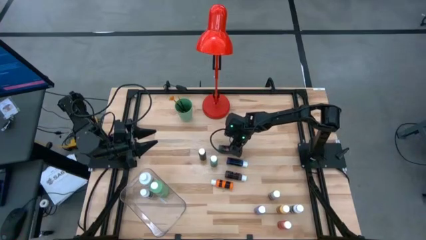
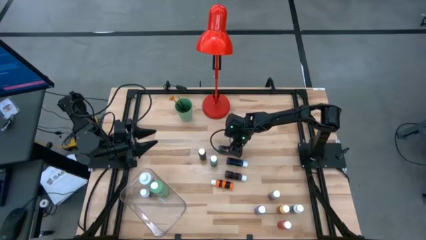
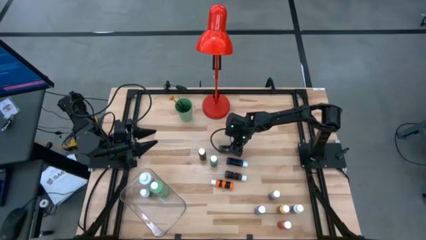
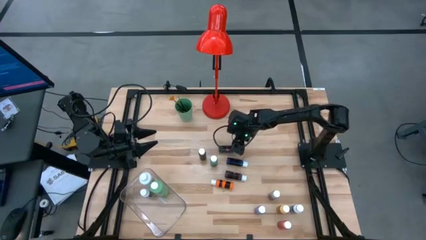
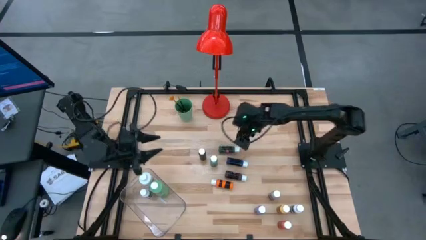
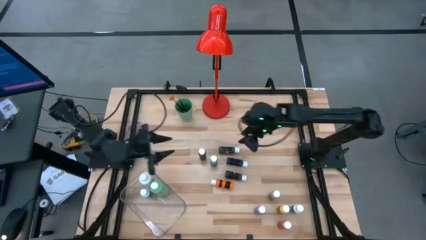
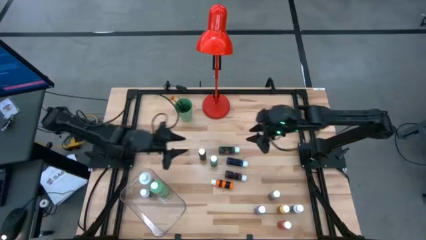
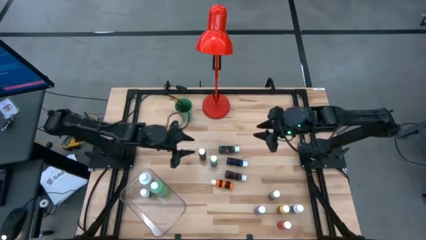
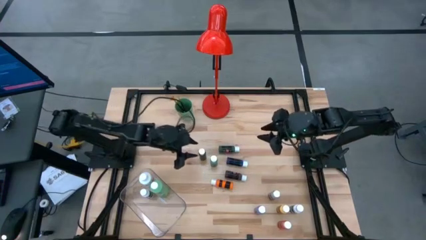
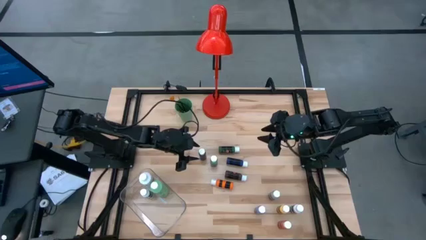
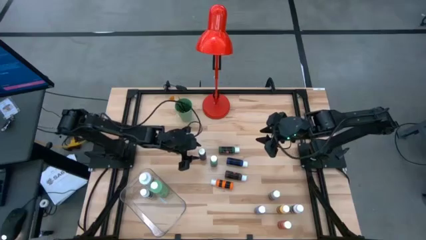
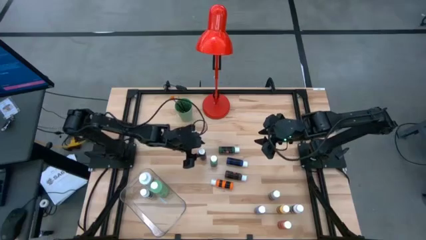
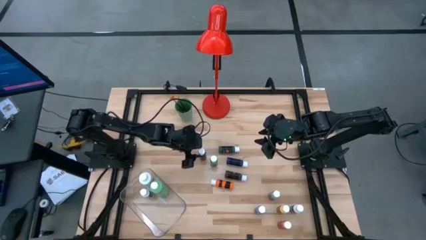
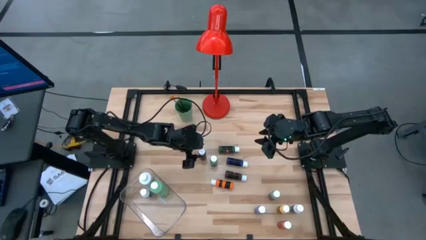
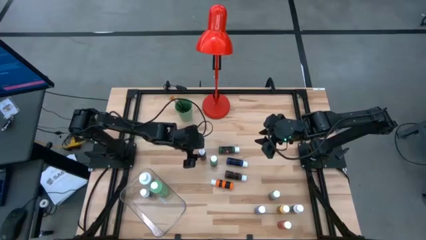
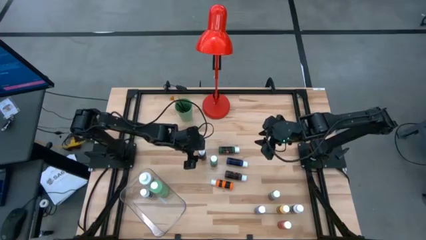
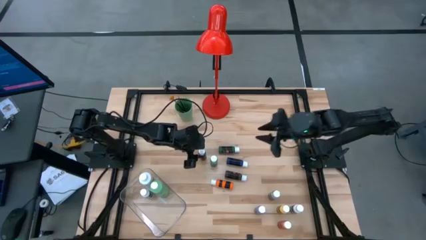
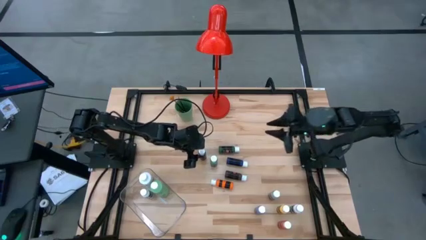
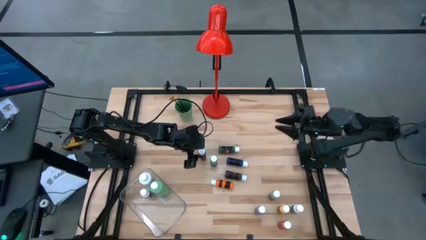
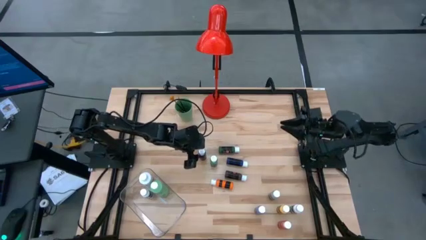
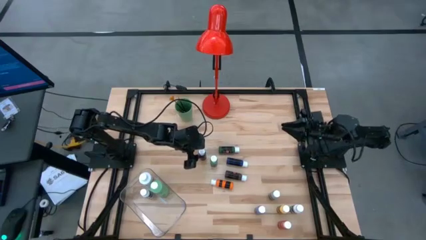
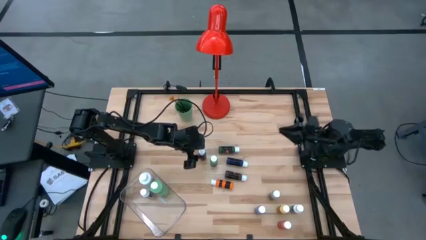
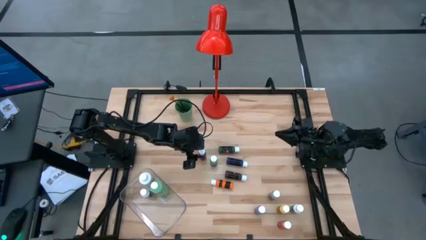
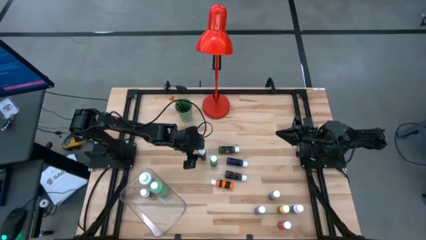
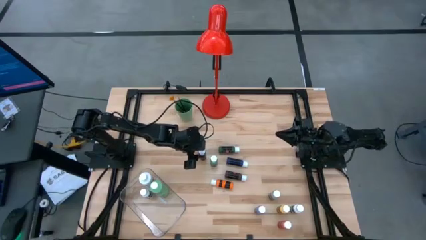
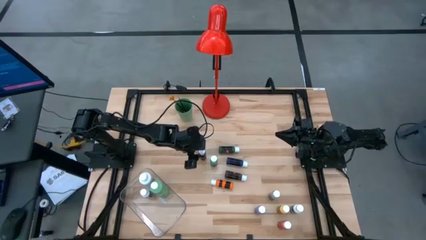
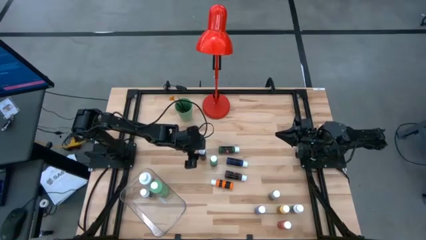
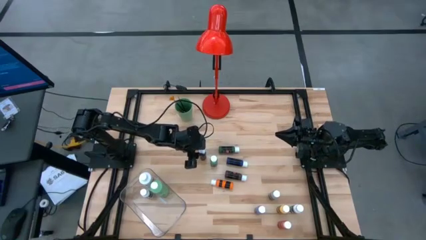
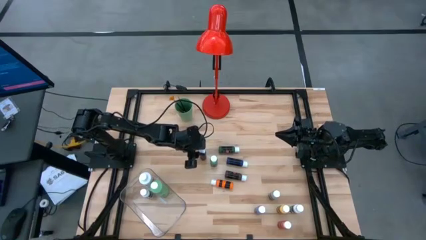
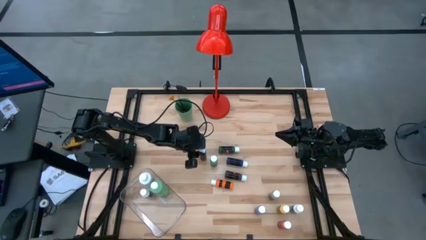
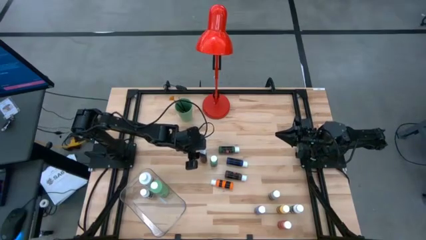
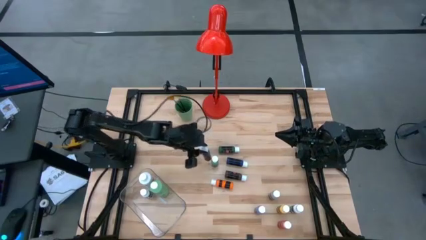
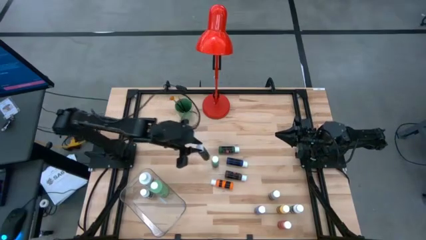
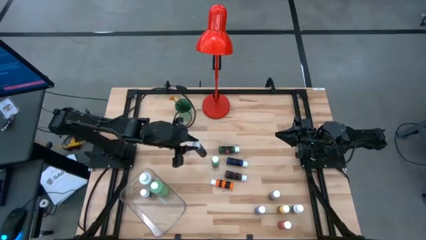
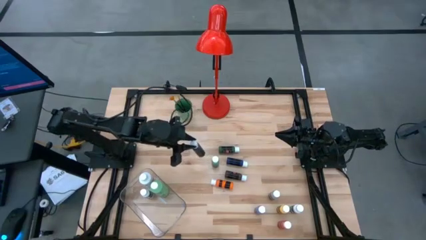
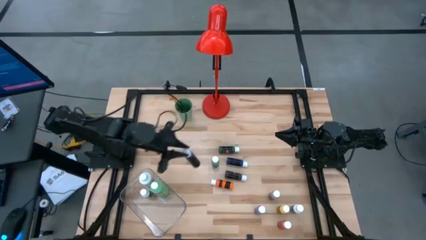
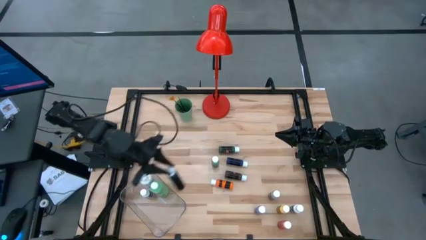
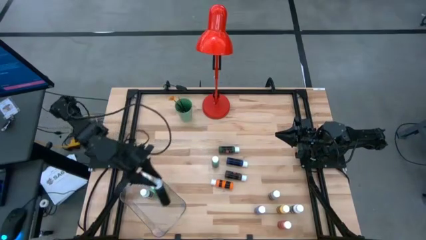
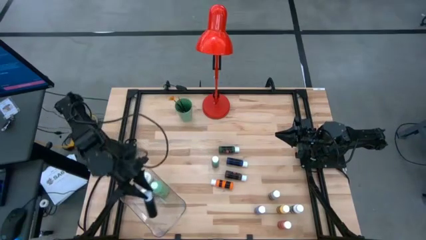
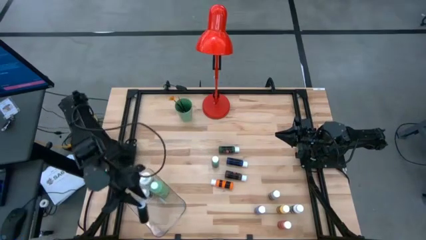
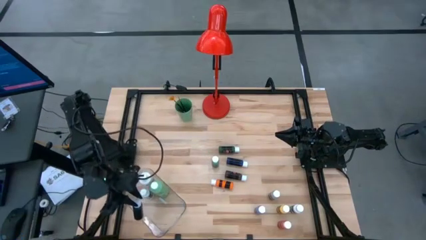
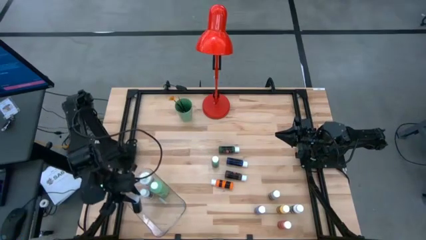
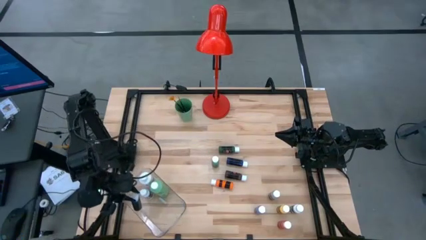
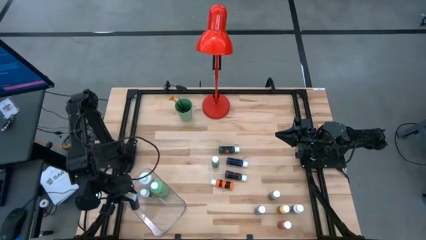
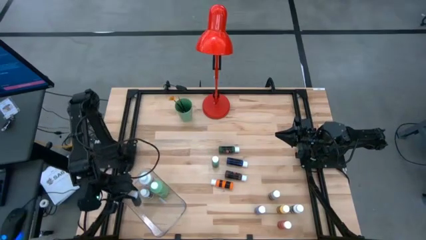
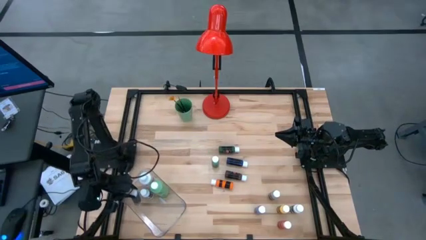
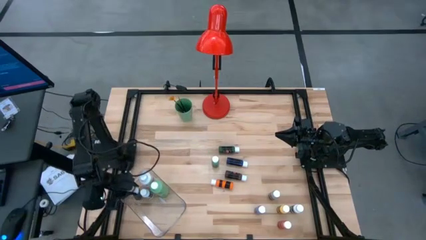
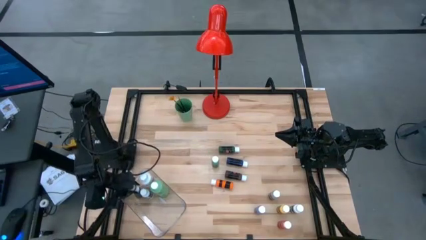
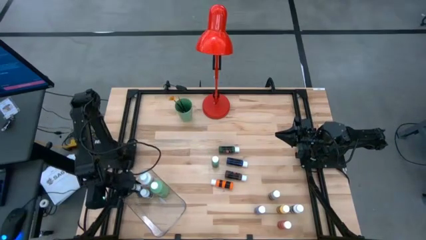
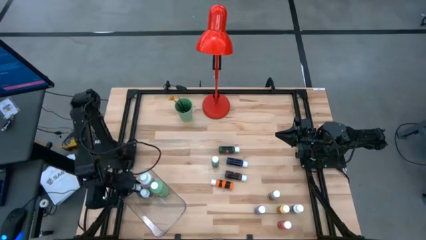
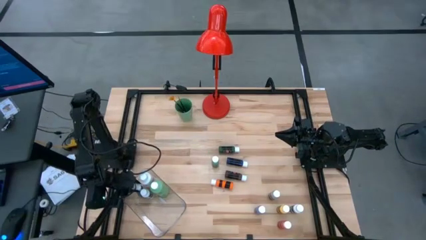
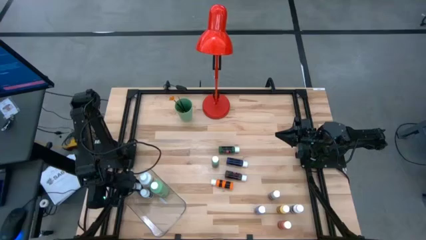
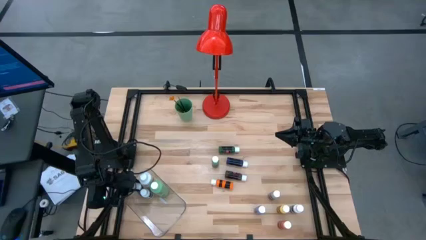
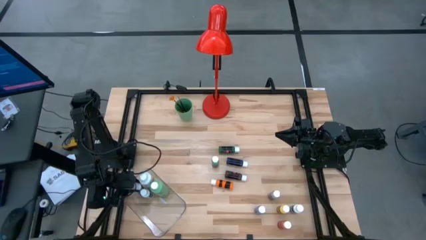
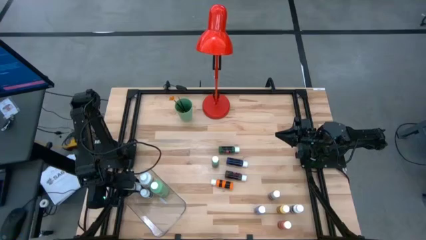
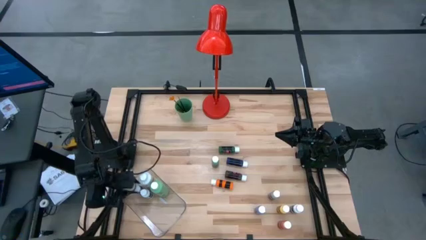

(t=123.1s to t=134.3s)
Task: Pick & Place Paint Supplies
Put the black coloring bottle into the transparent bin

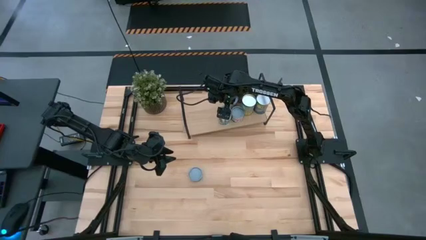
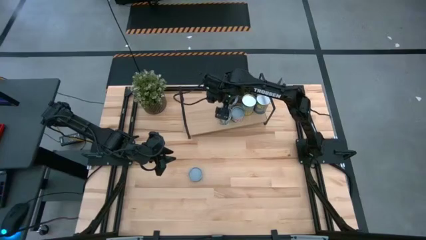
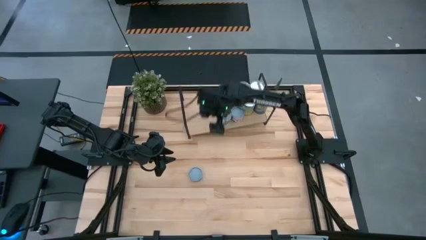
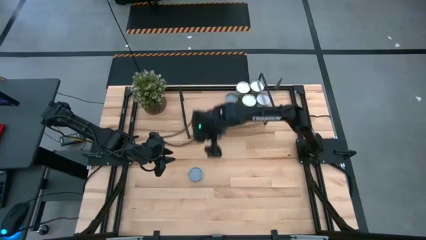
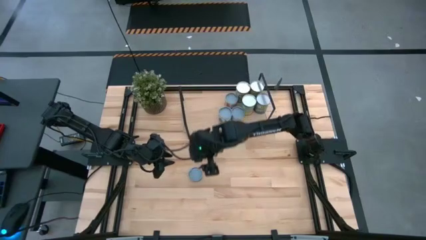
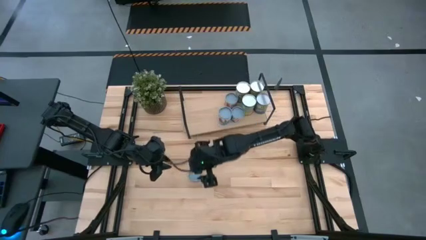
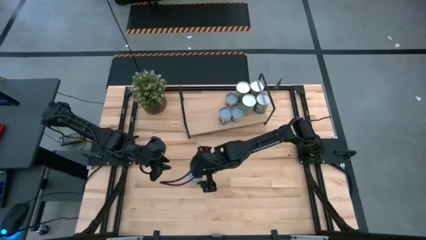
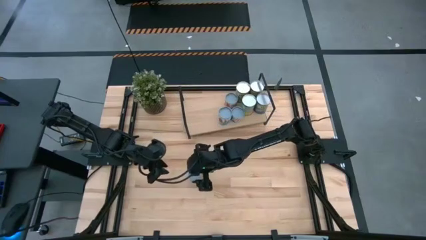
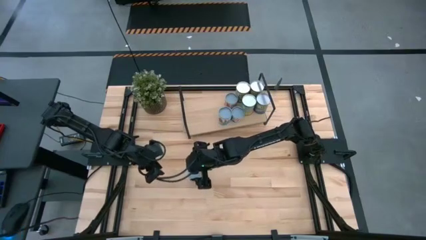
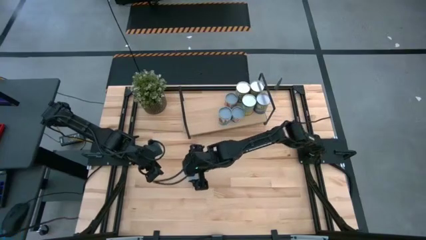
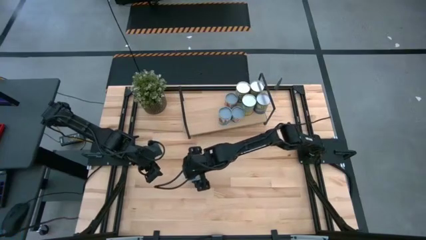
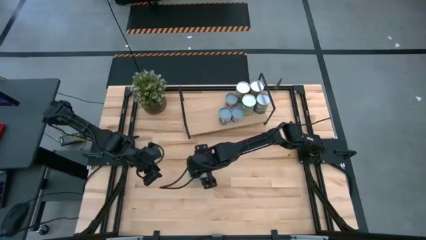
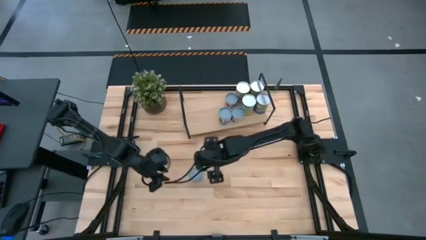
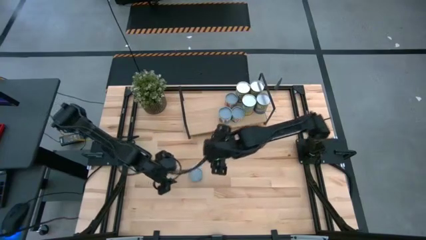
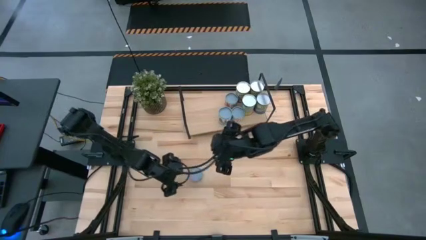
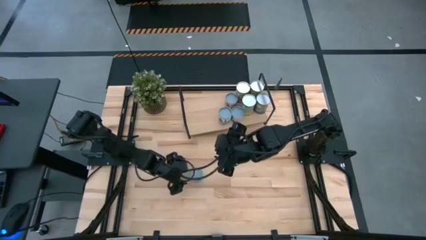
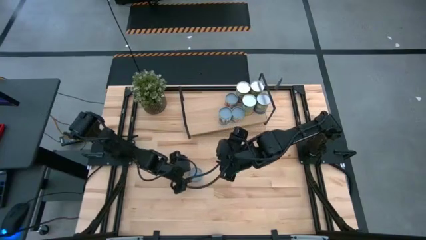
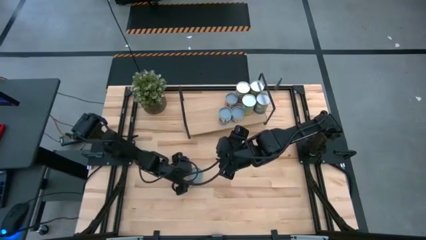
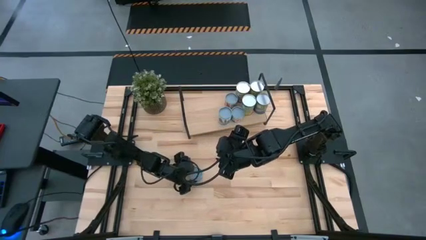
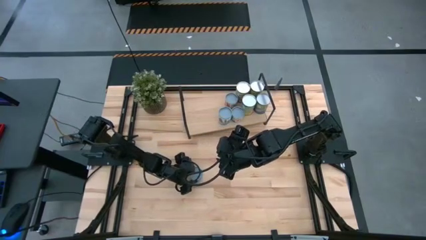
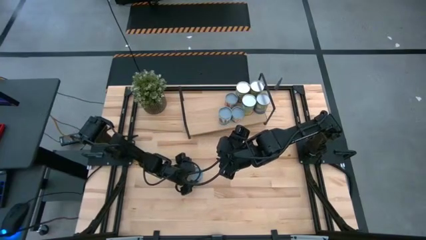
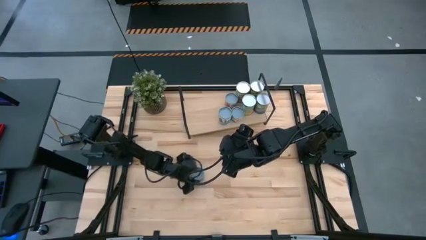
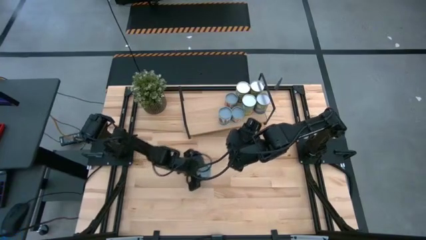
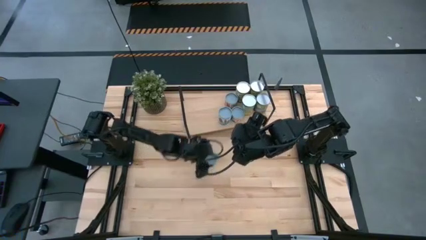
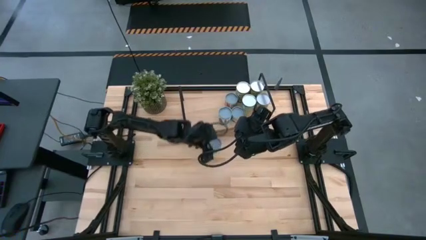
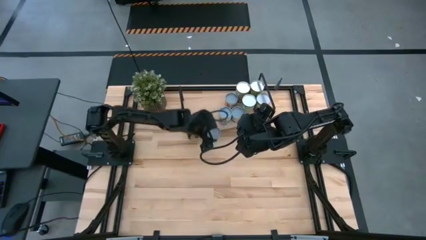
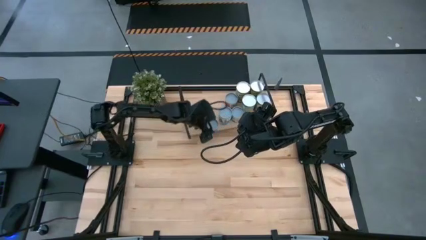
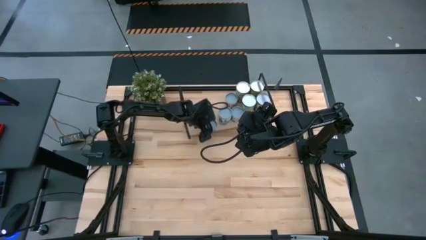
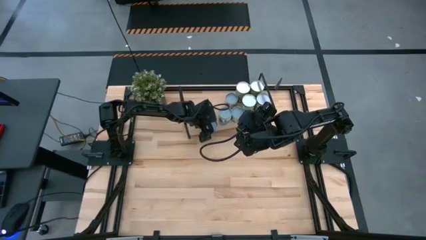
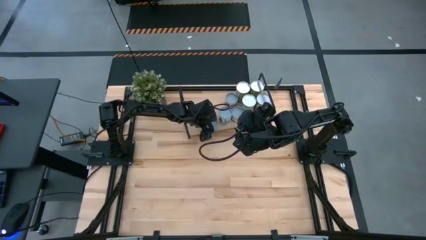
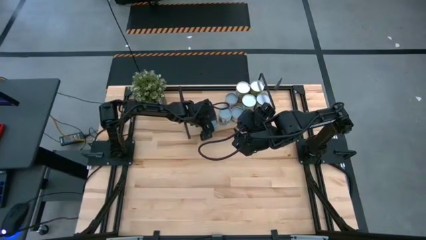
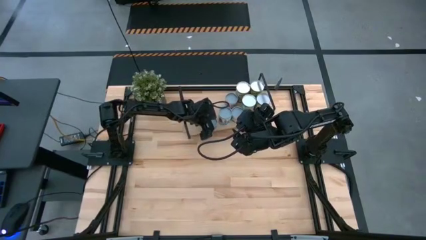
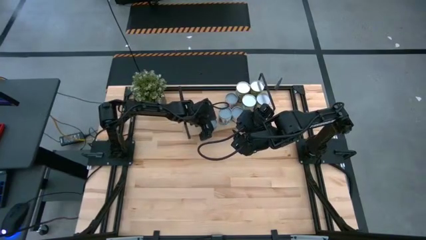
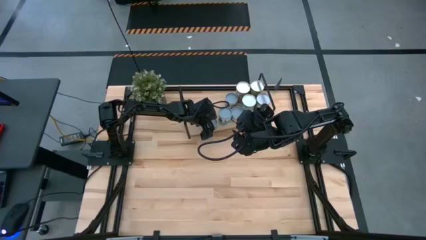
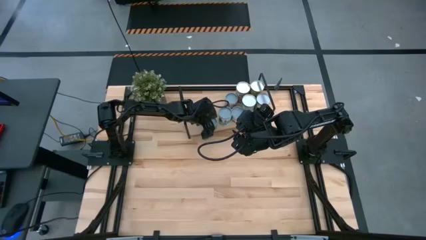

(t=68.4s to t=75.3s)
Task: Pick and place cans onto a shelf
Put the canned tuna on the shelf
